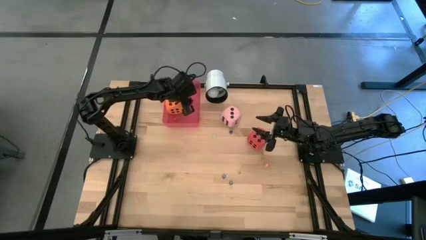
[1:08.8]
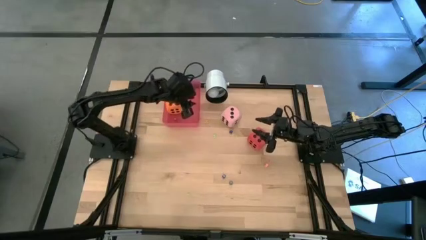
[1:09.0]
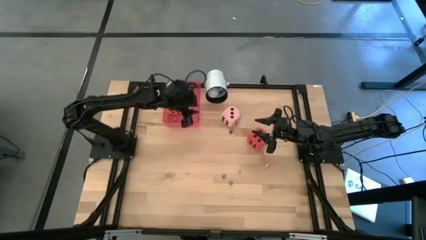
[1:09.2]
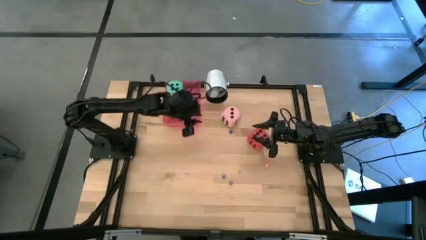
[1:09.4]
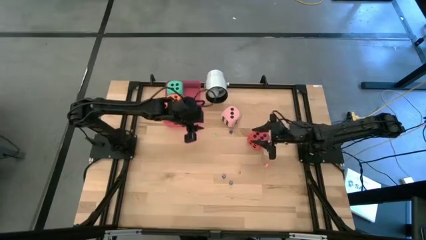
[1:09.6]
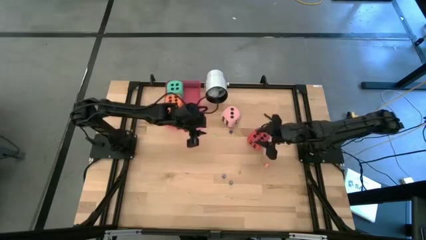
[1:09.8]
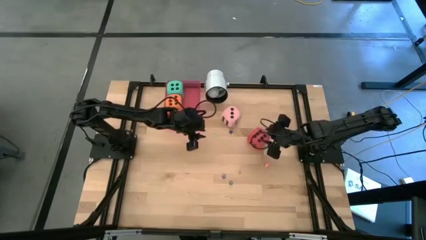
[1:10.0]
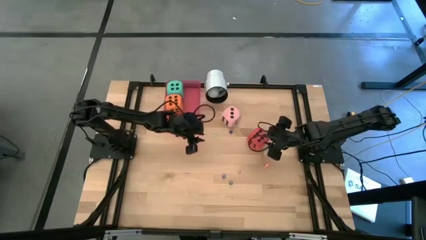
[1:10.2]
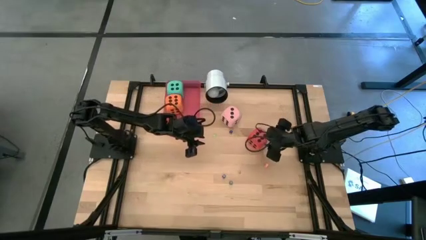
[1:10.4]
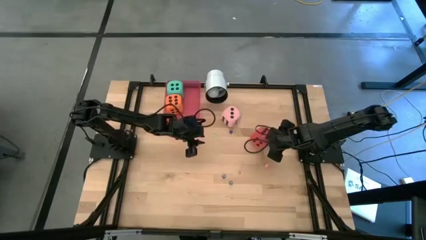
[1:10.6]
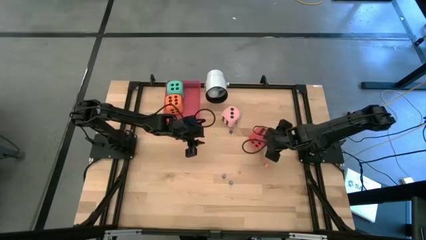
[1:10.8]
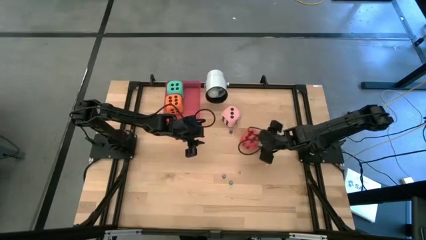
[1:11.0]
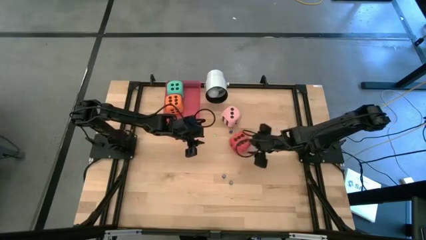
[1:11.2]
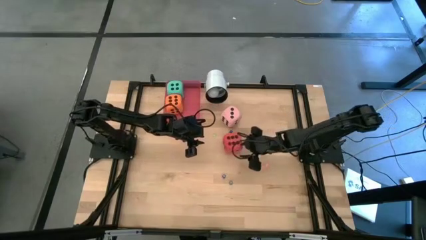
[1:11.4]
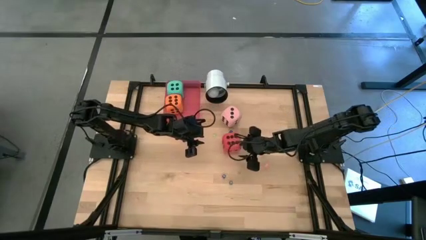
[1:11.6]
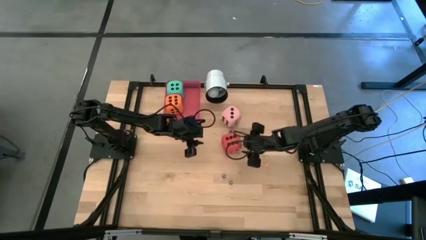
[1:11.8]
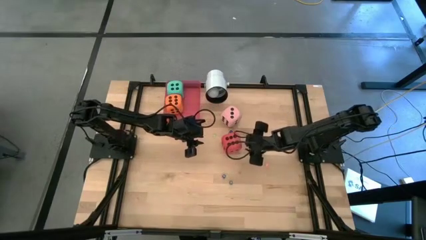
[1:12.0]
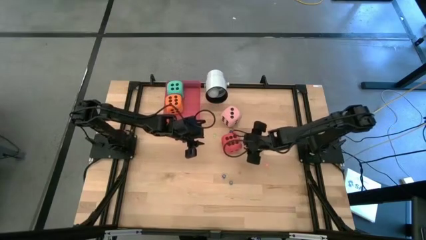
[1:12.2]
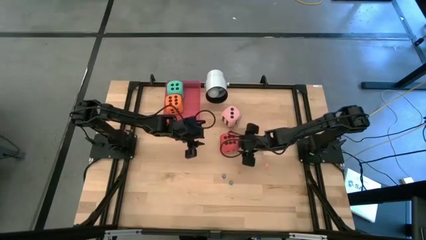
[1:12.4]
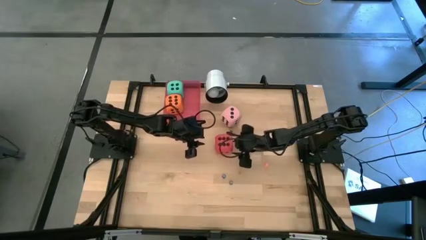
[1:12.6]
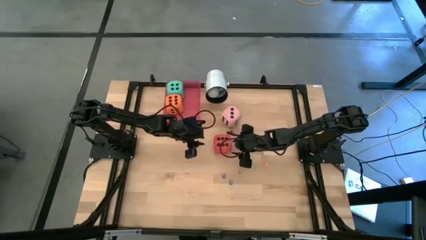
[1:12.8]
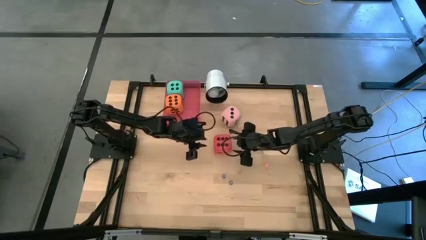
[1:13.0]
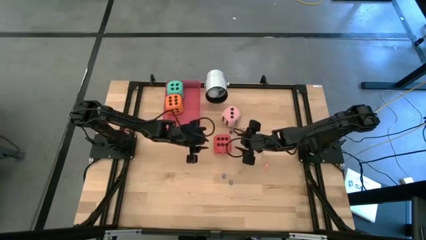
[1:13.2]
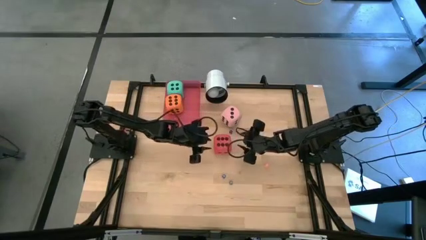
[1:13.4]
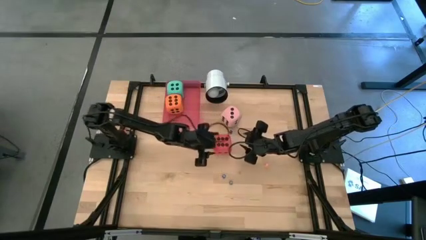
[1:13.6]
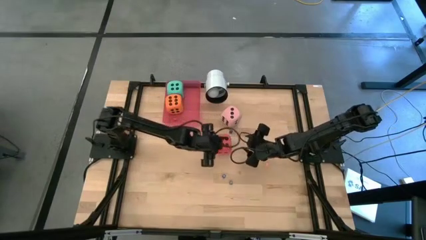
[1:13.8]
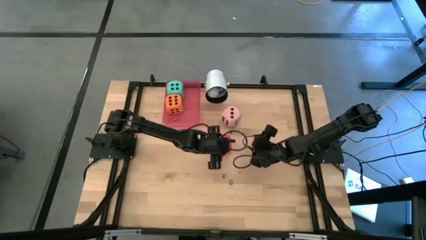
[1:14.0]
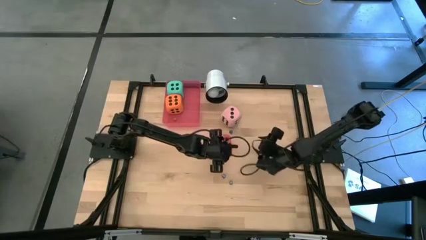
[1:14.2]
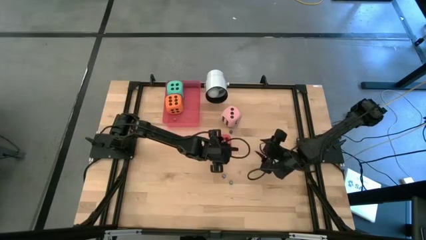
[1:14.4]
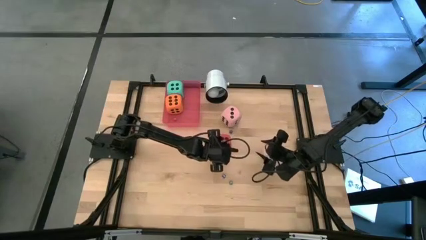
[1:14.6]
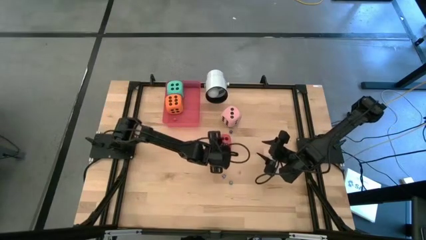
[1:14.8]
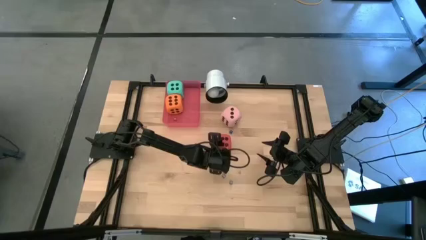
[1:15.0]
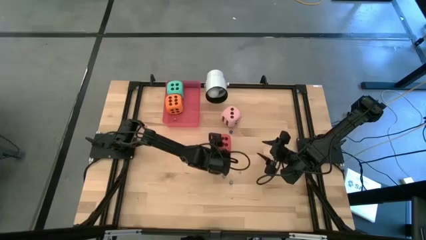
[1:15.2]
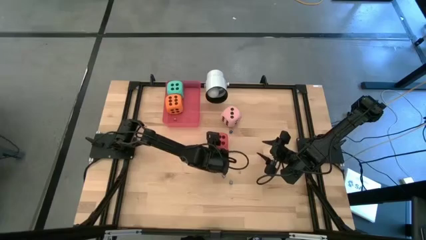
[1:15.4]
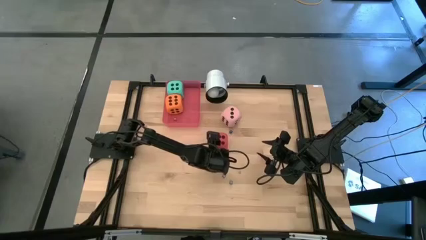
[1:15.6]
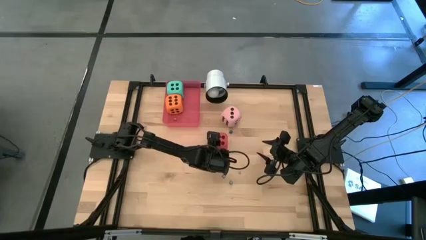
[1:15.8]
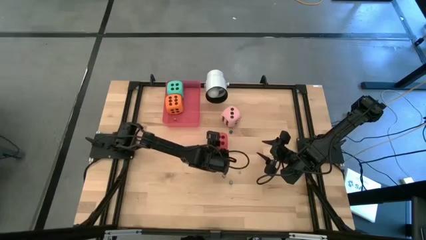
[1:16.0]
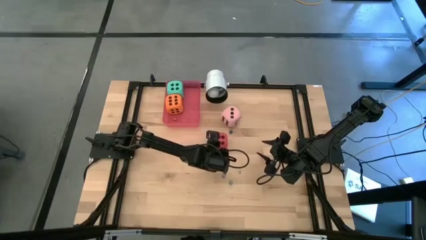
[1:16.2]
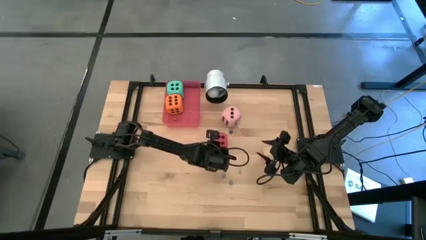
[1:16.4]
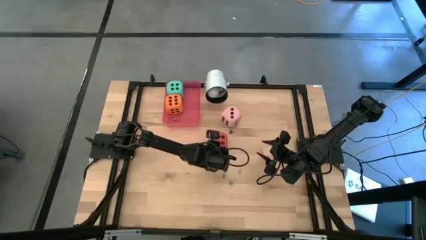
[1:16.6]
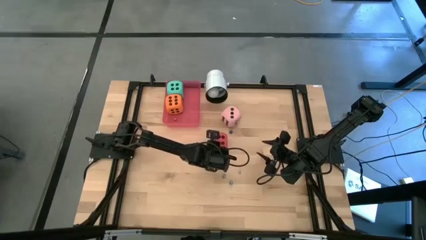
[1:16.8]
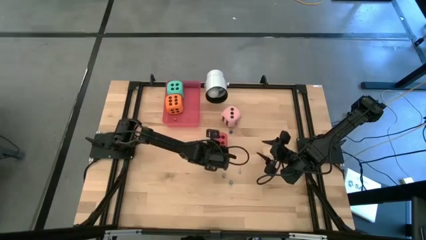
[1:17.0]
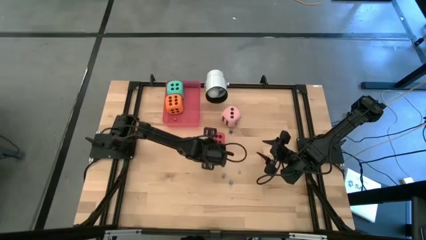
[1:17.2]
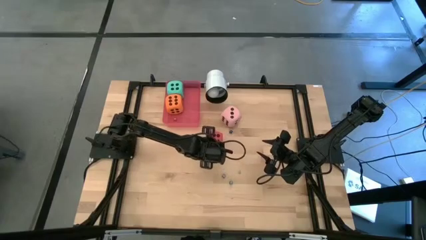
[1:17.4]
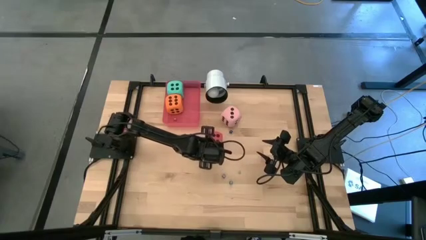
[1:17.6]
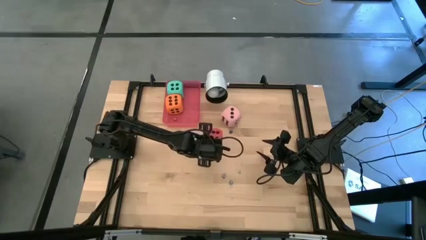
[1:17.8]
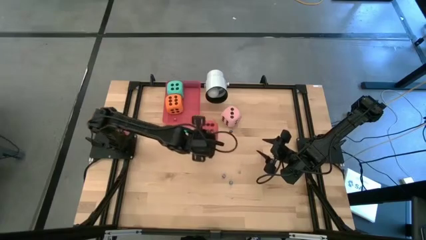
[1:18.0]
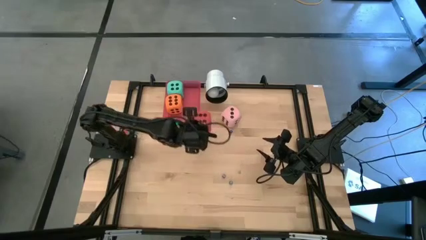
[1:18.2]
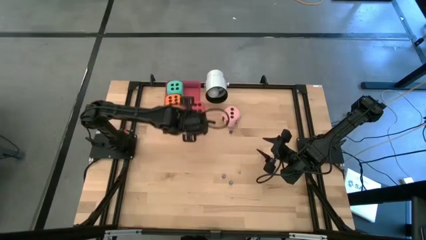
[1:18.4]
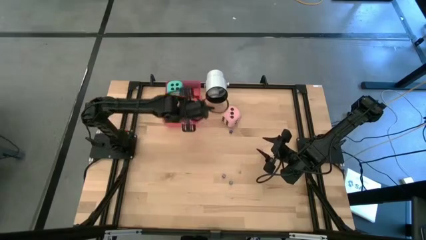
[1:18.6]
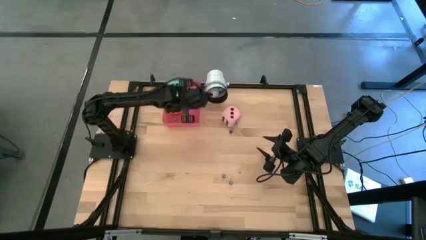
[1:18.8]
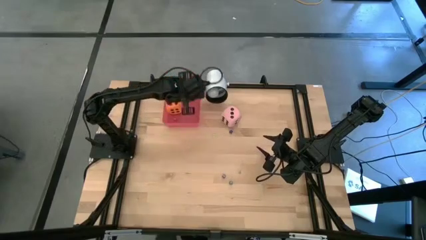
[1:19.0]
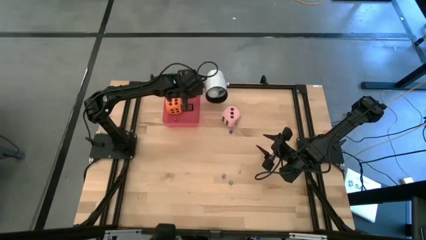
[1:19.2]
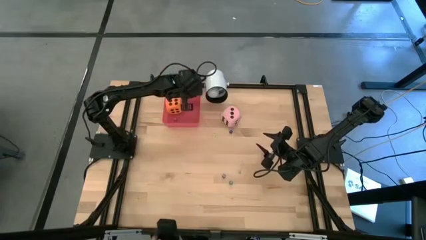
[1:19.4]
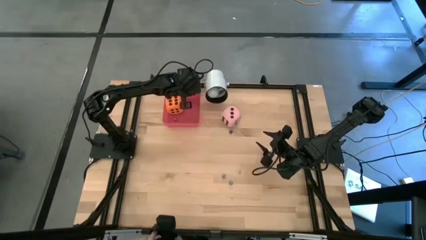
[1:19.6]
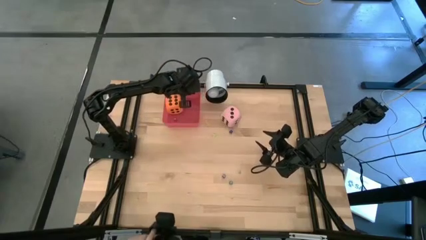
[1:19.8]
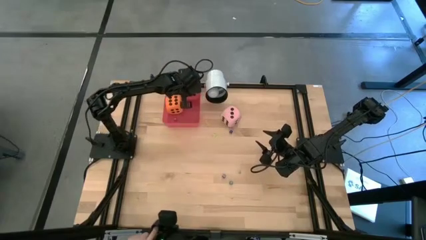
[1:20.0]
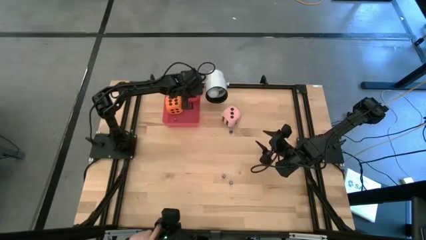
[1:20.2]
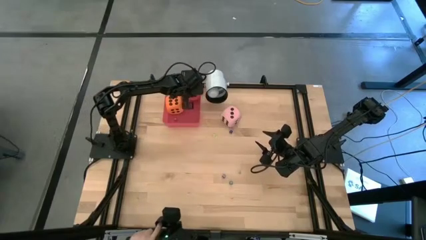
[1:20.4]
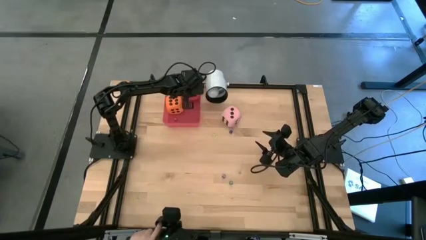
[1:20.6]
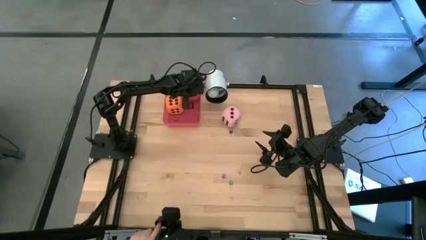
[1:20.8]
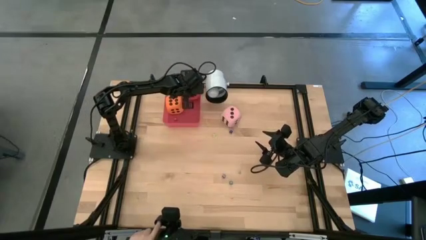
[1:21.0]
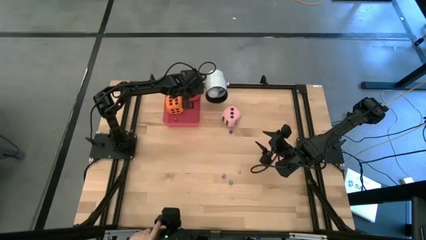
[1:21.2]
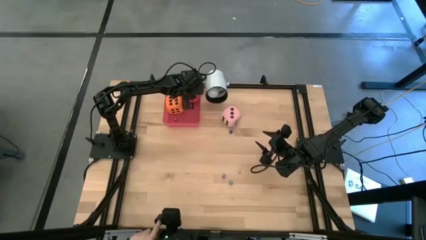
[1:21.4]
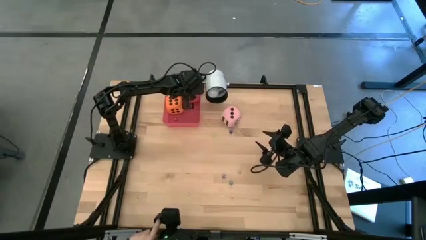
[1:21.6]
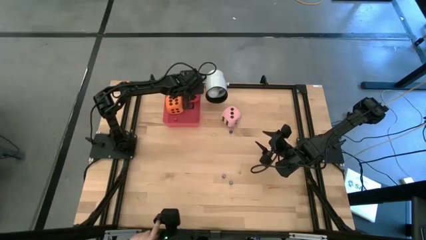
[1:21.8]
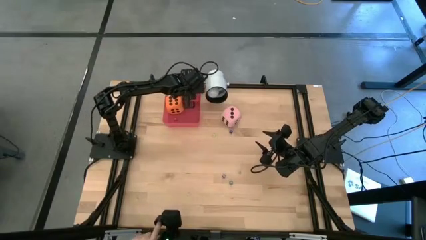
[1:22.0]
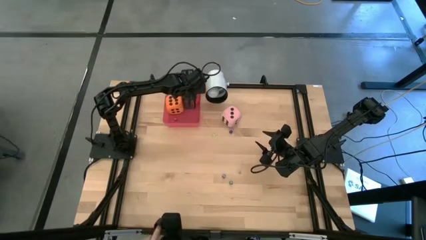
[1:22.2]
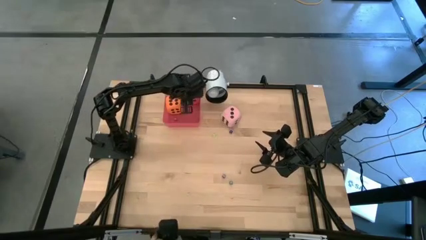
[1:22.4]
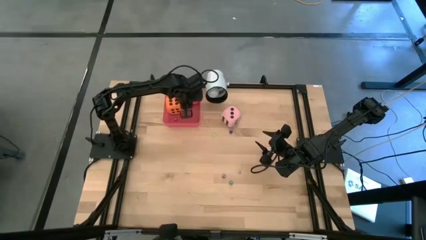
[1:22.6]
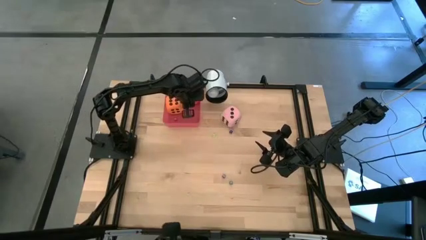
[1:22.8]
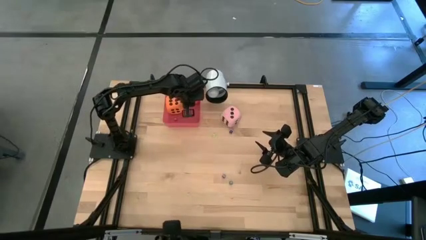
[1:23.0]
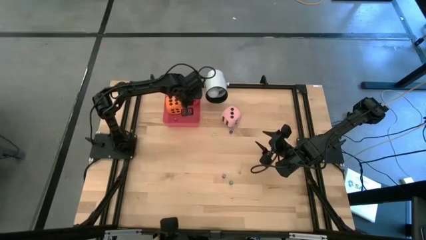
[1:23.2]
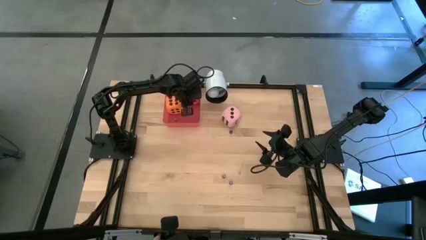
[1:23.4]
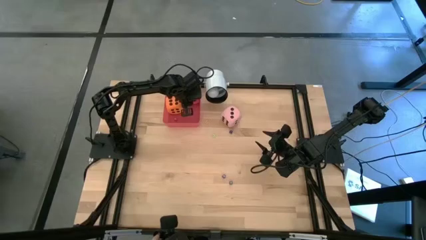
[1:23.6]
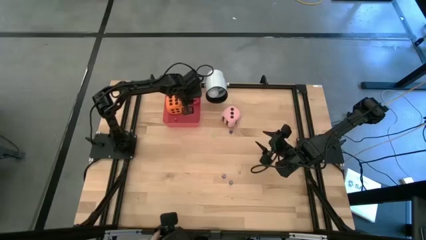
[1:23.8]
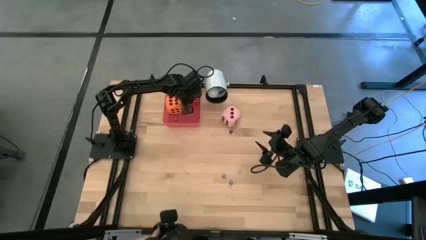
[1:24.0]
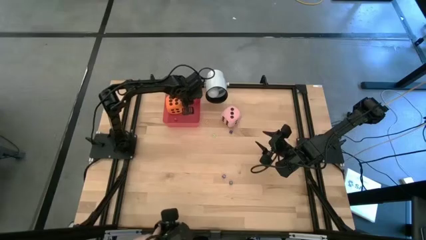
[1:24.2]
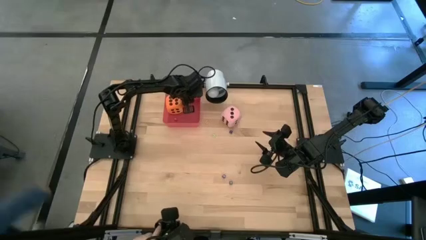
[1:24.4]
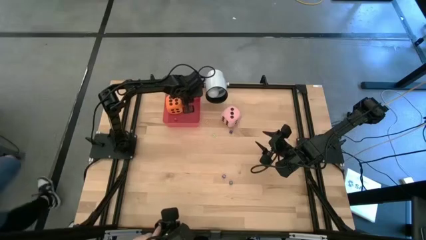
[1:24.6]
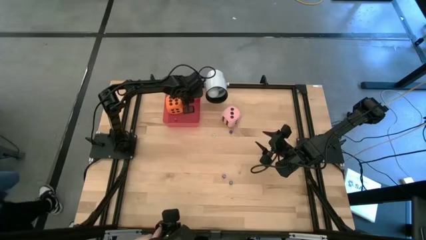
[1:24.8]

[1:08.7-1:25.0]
Task: Pick & Place Dice
Put the big red dice into the red bin
